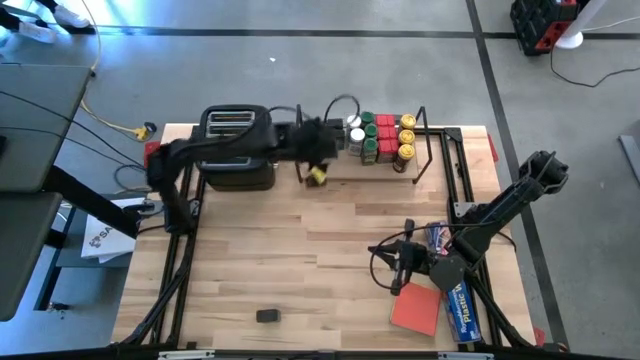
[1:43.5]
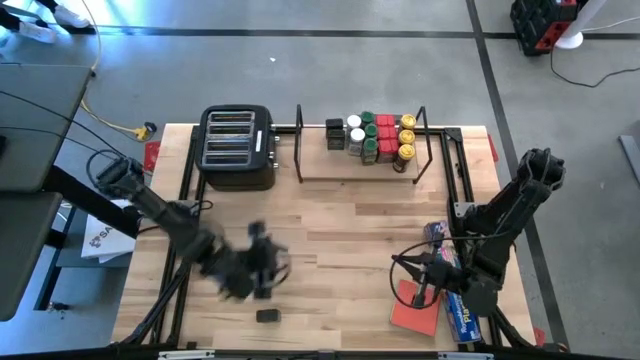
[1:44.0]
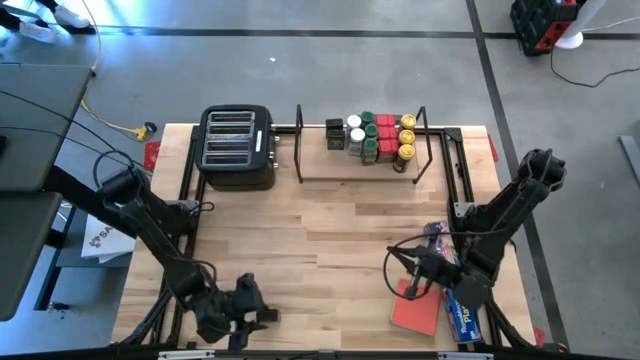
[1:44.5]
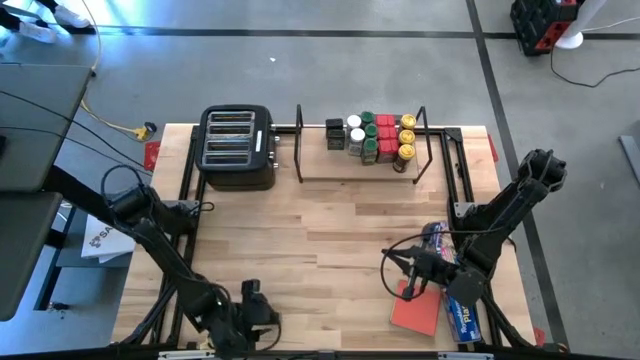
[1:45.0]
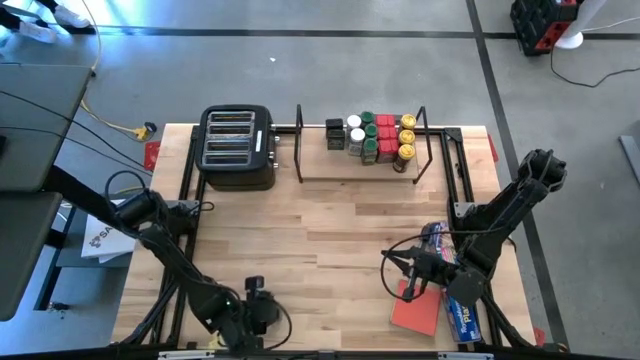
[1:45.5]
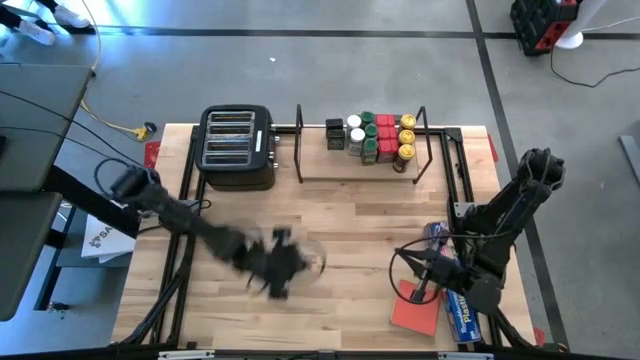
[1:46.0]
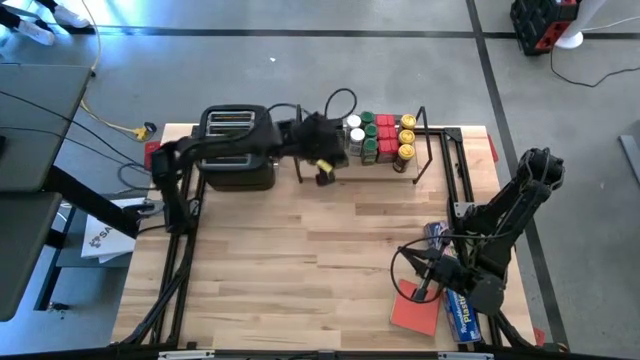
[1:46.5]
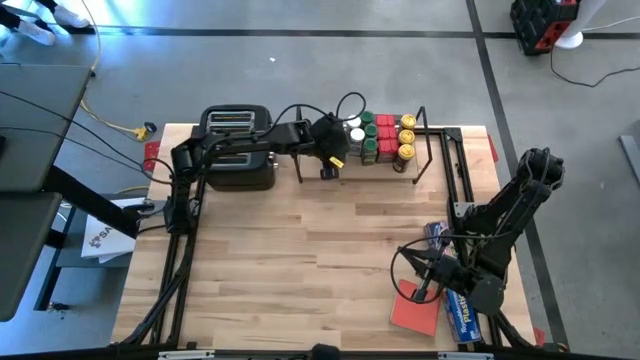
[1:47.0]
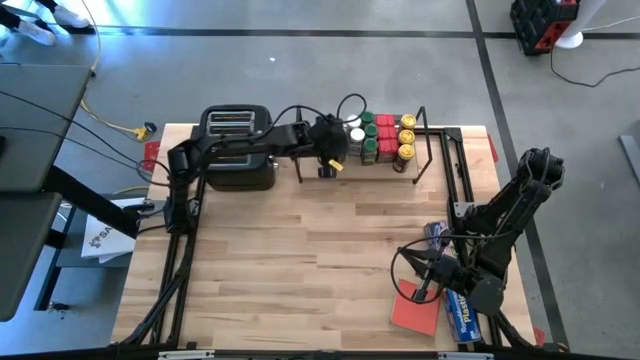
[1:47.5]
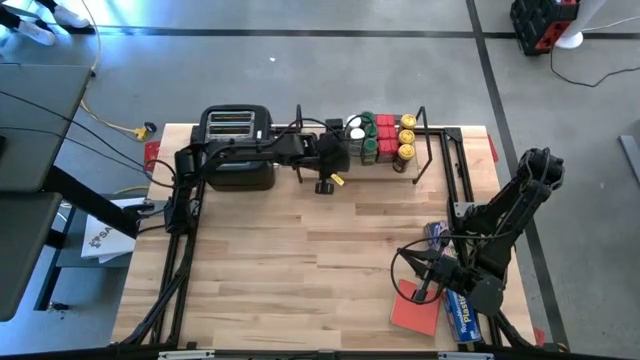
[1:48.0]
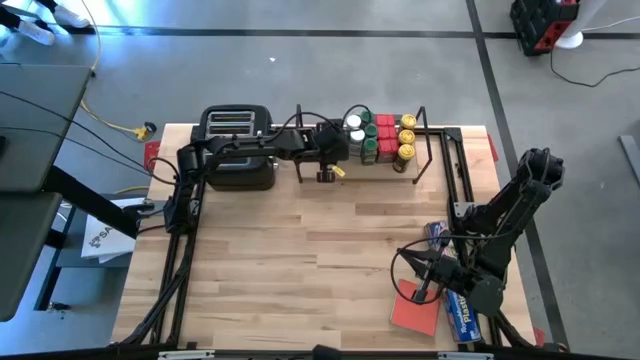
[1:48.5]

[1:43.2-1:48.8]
Task: Shelf spices
Put the green seasoning can on the shelf aligned with the other green seasoning cans

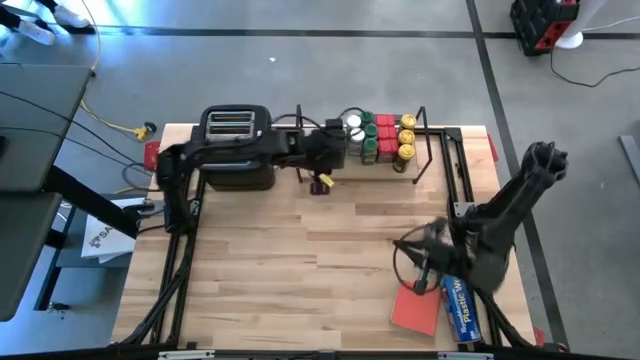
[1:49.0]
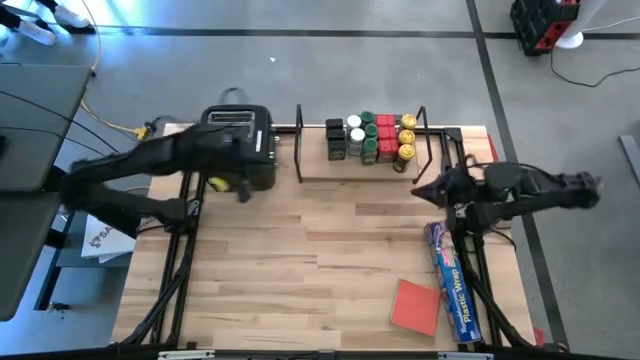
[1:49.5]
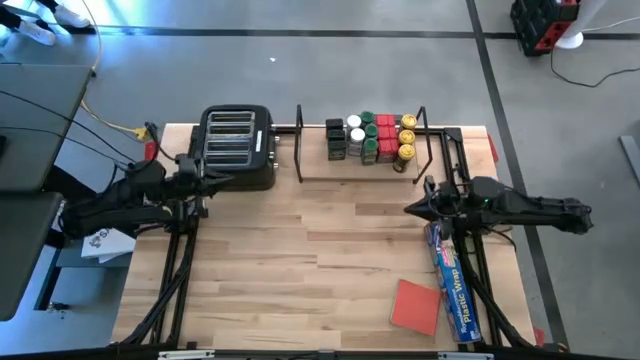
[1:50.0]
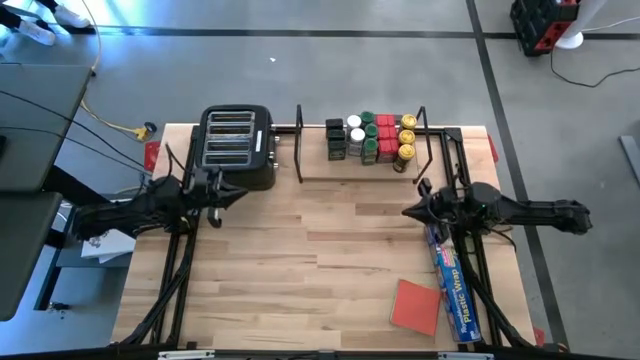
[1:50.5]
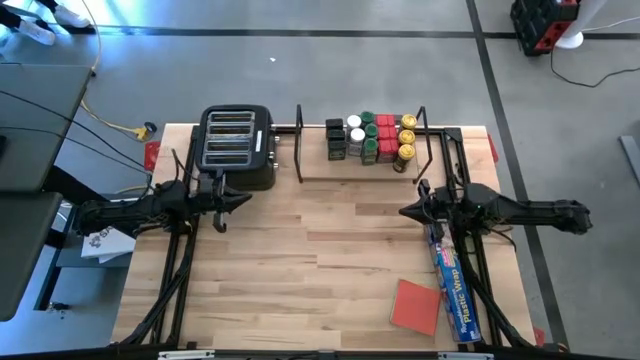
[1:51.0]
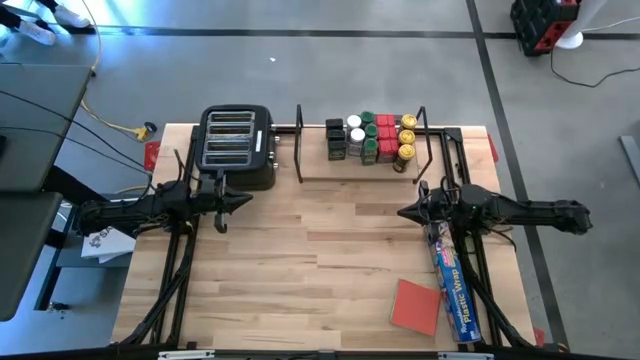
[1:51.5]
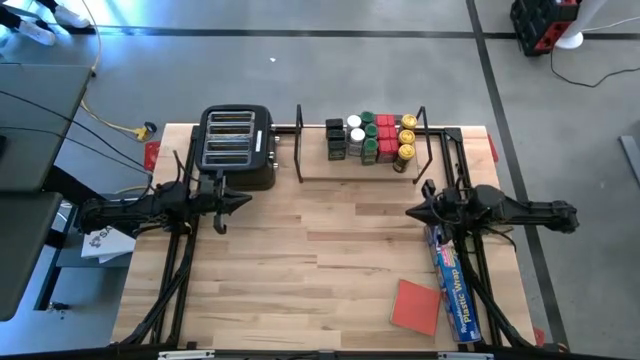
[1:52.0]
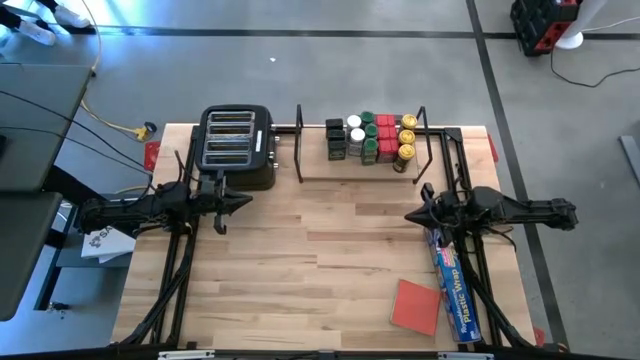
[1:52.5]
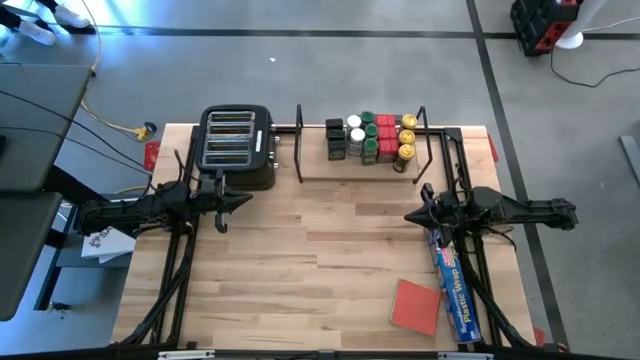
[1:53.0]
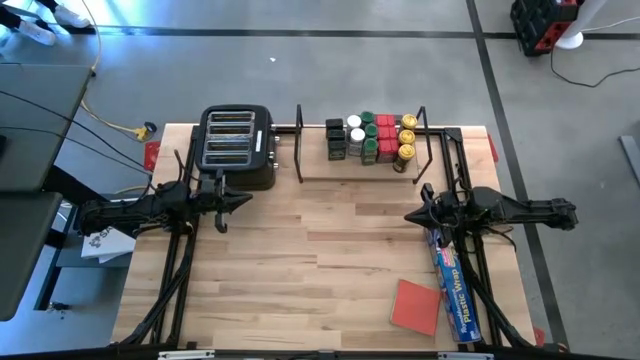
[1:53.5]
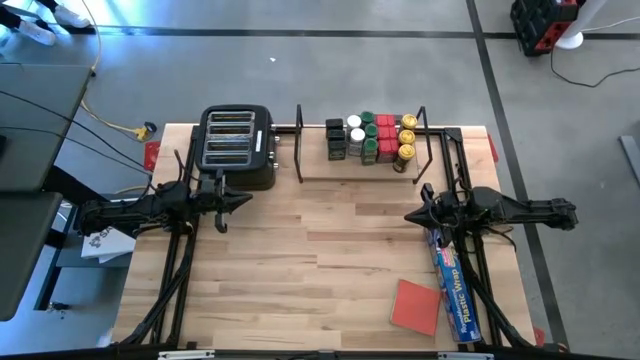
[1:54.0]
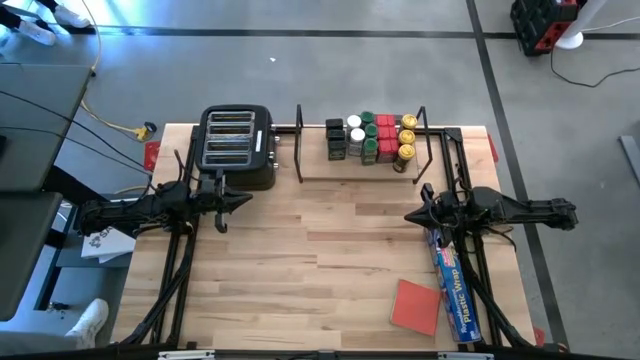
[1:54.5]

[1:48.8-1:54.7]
Return to Home Position

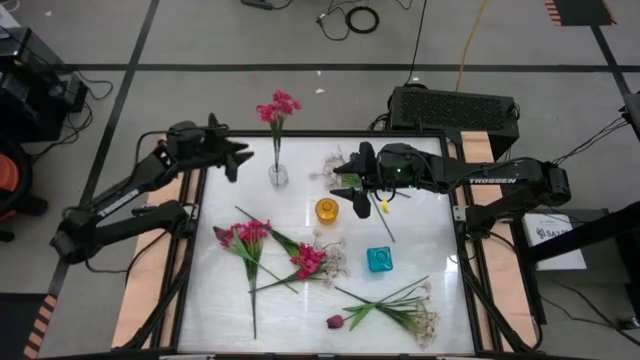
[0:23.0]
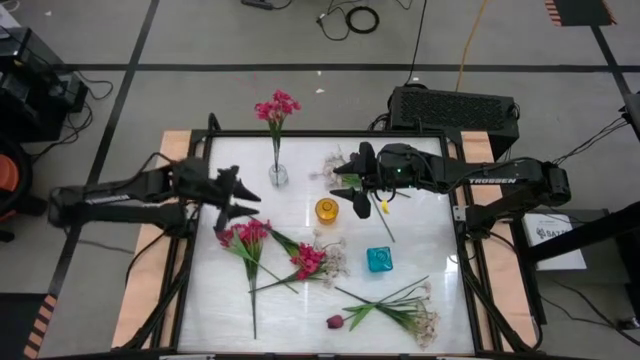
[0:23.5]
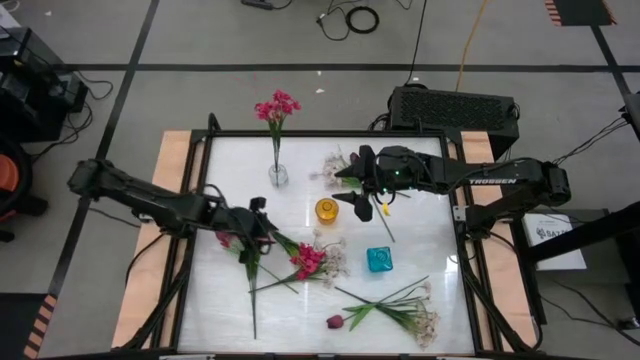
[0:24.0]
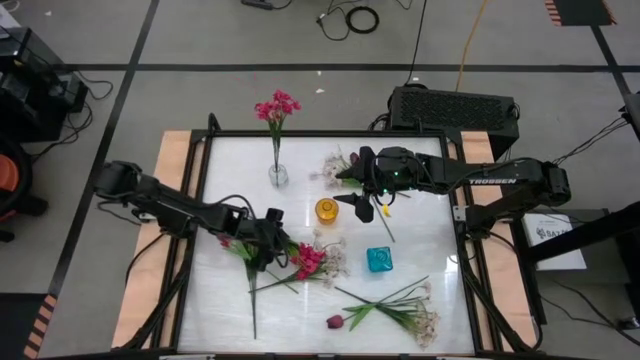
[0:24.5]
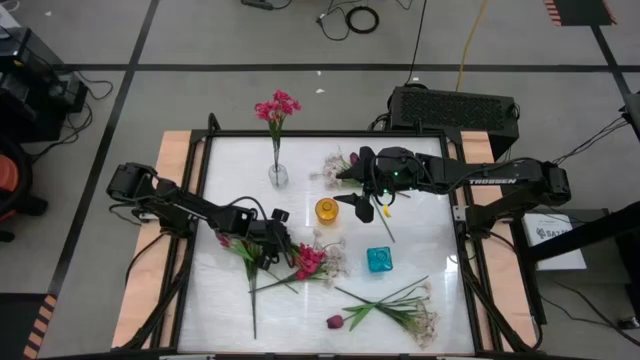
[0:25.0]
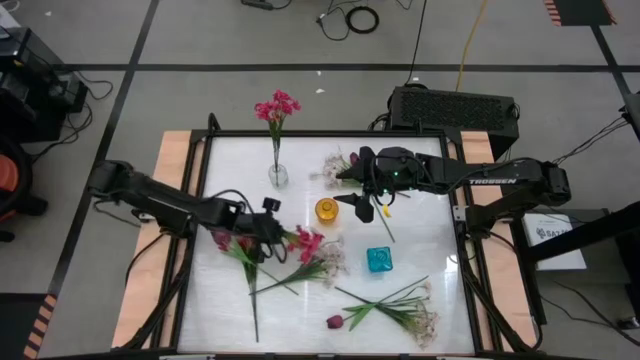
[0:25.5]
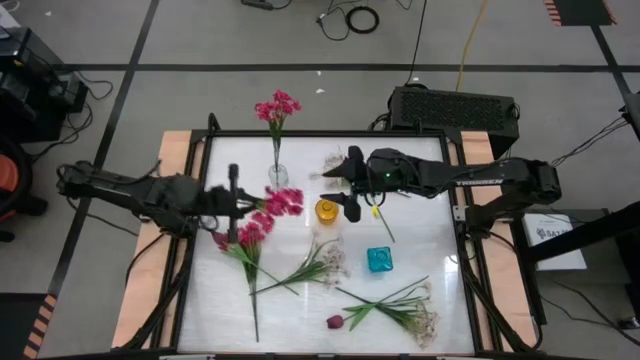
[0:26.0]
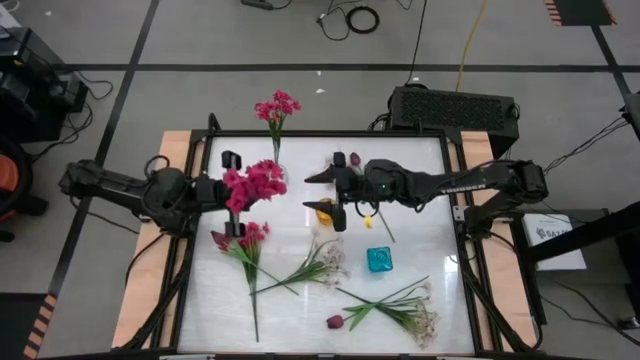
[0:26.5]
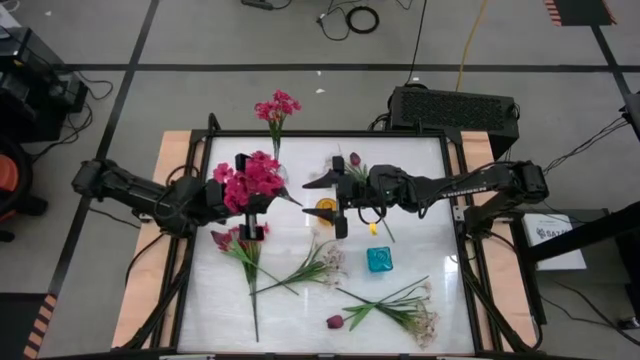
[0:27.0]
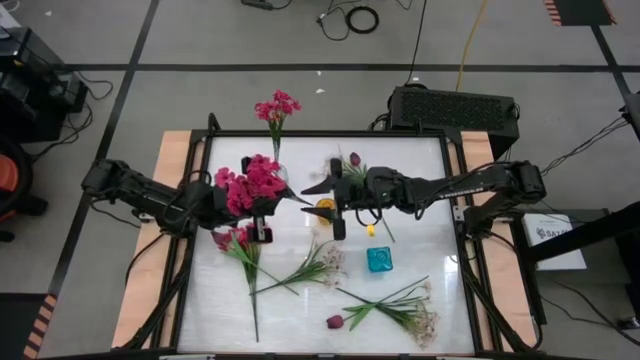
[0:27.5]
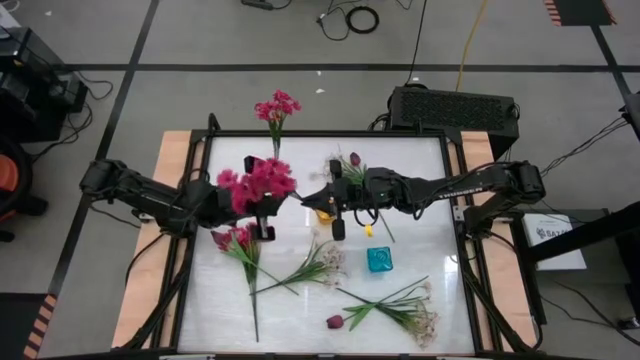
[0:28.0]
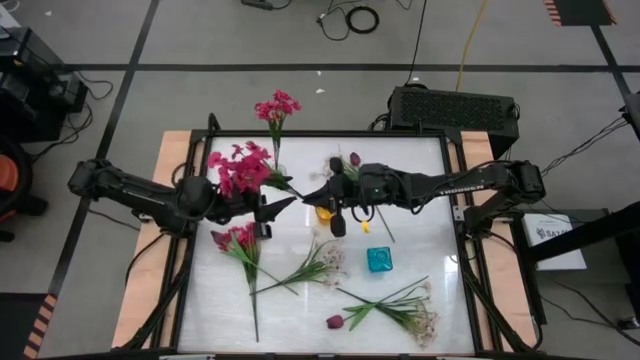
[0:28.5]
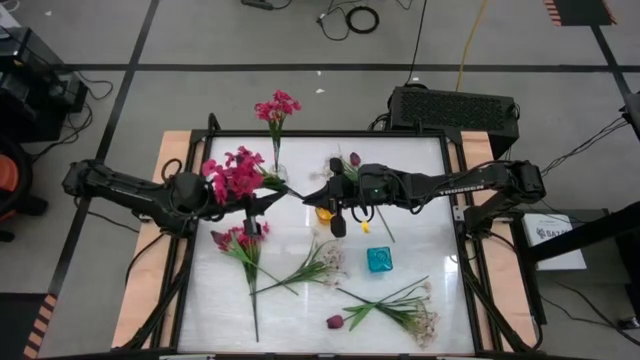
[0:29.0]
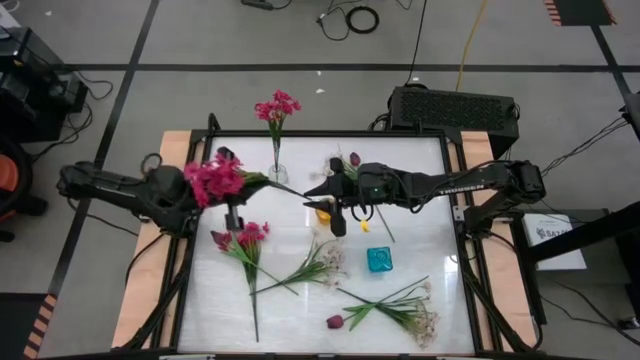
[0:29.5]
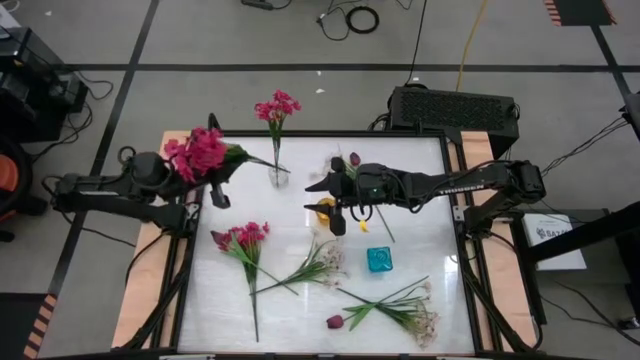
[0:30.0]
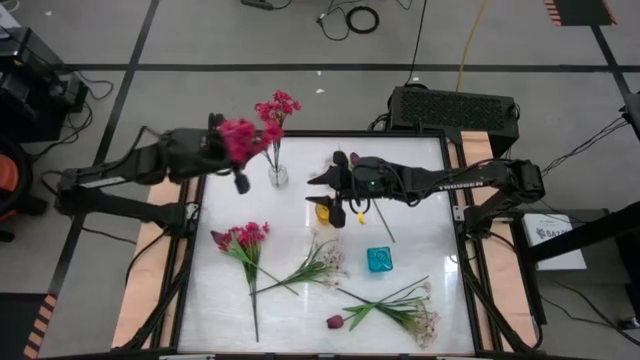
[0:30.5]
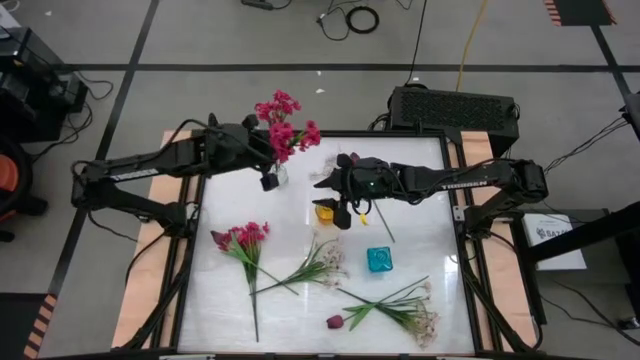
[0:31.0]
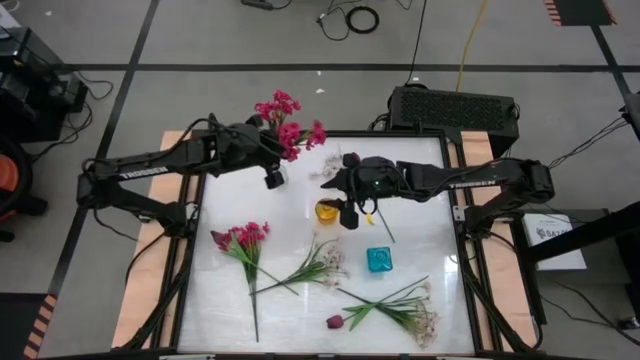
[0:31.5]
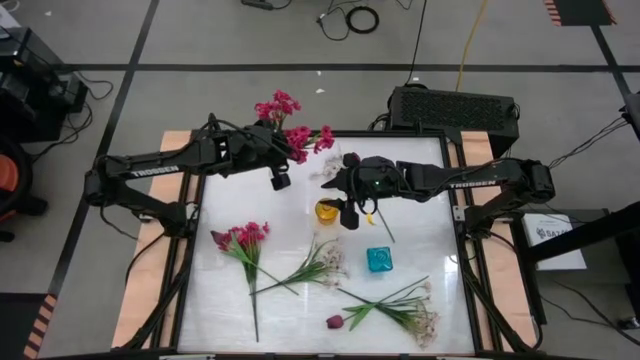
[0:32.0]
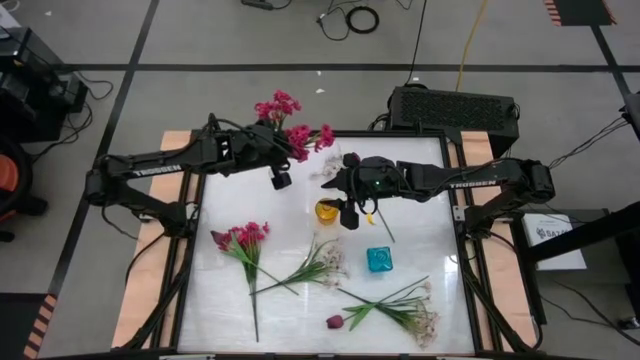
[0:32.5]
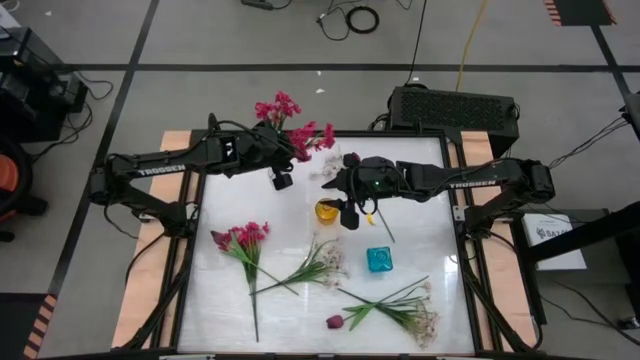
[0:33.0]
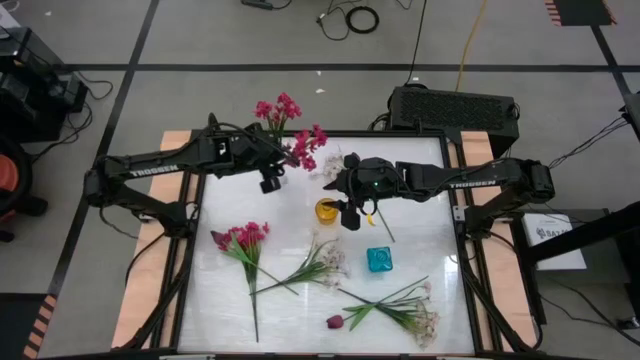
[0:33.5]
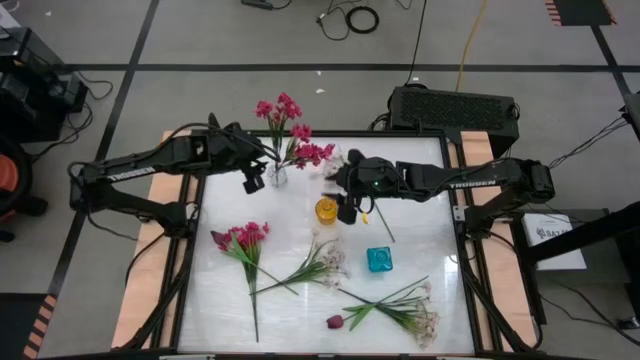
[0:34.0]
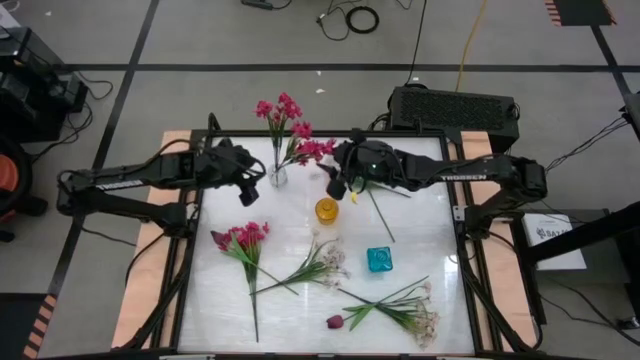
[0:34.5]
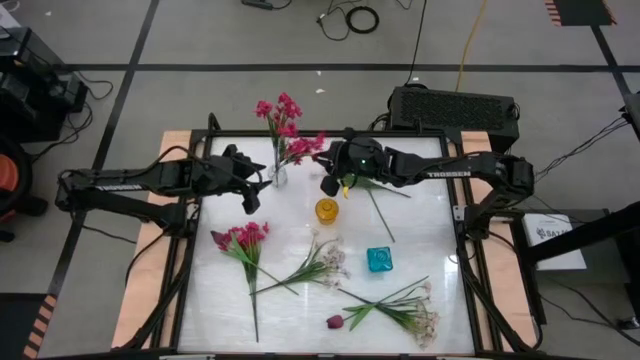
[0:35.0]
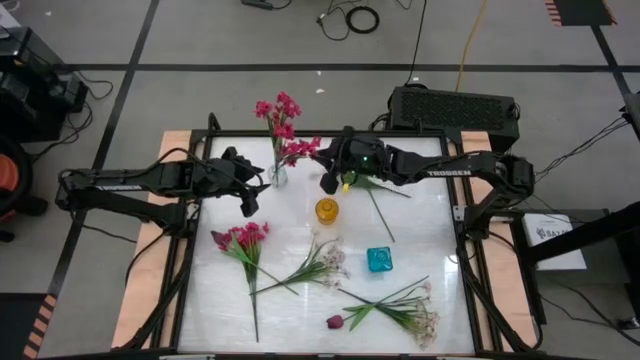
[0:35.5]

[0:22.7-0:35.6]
Task: Sort flowers into vase by color
Put the right pink flower into the transparent vase
